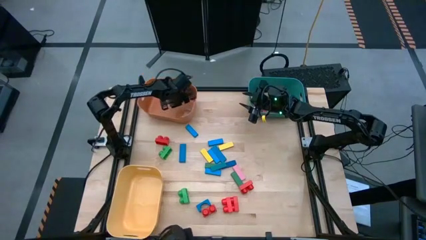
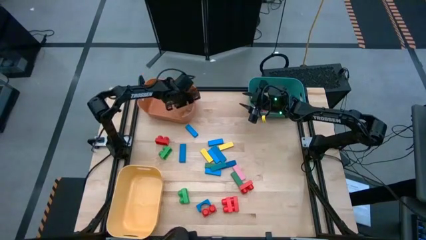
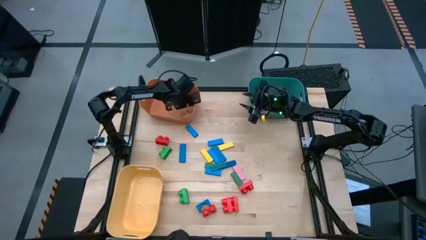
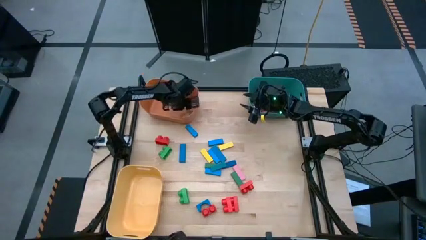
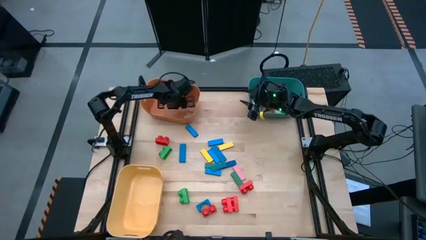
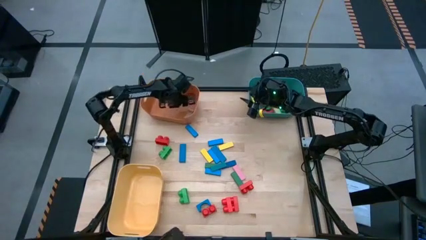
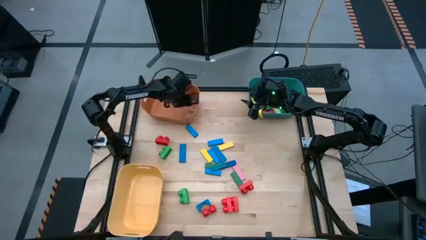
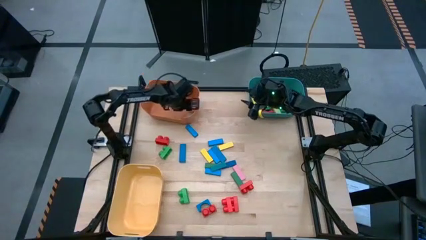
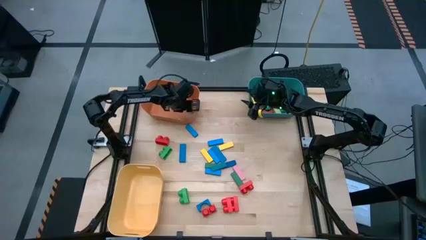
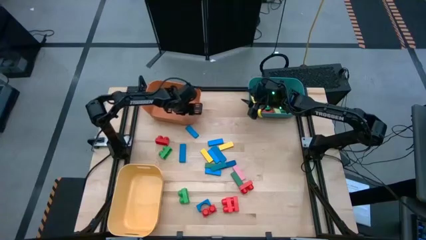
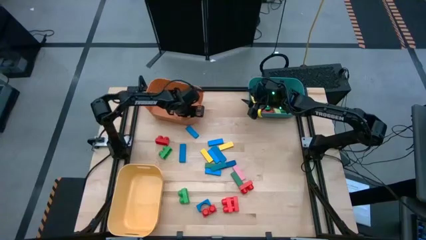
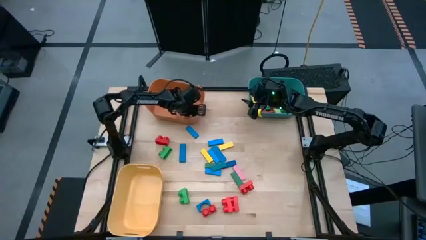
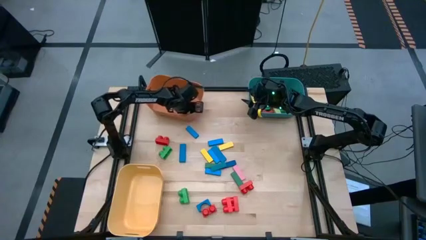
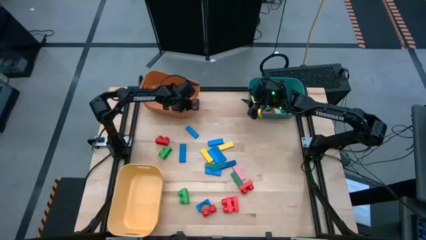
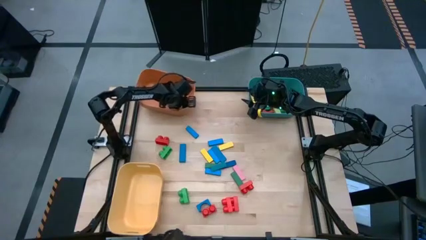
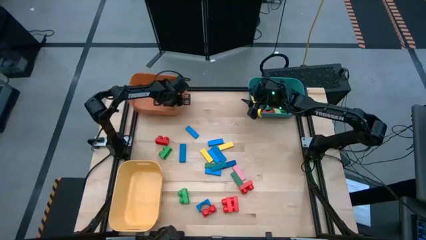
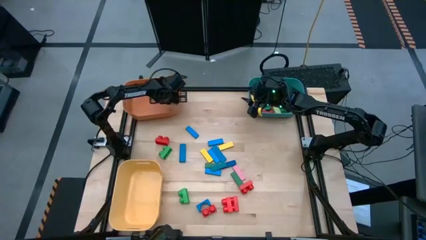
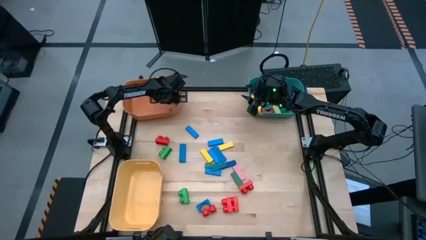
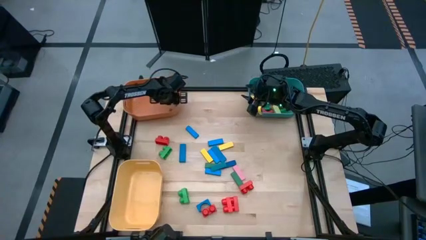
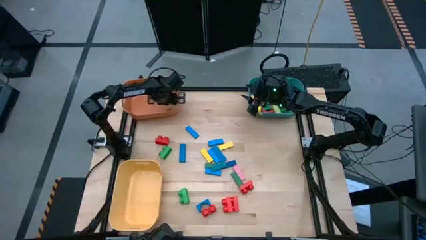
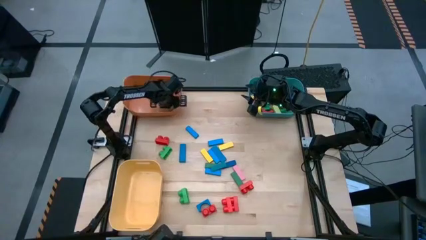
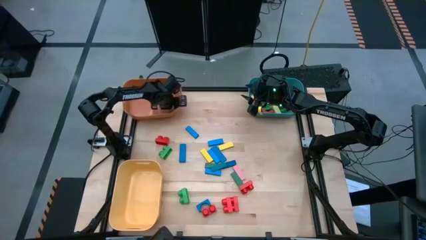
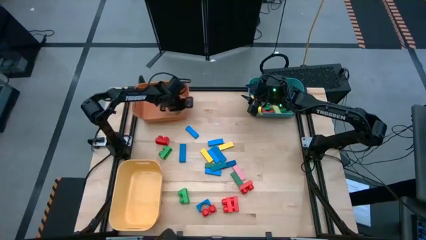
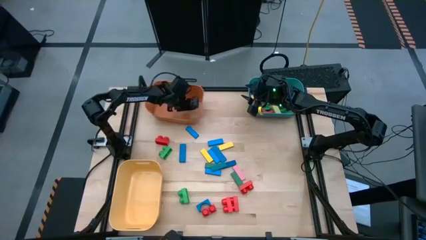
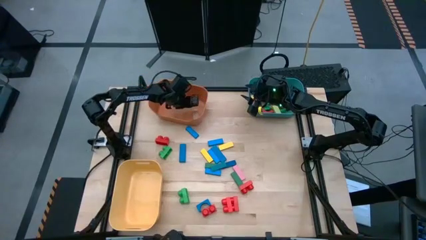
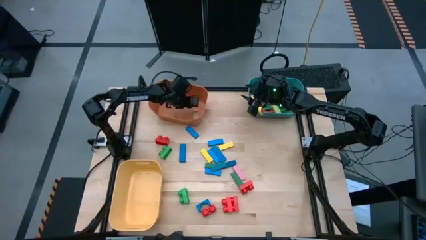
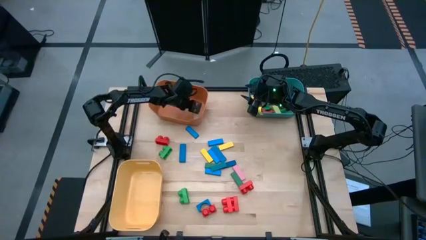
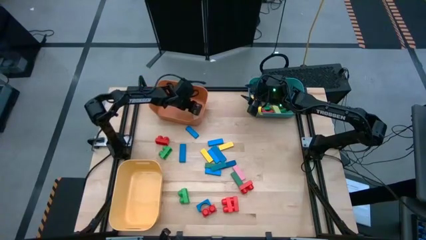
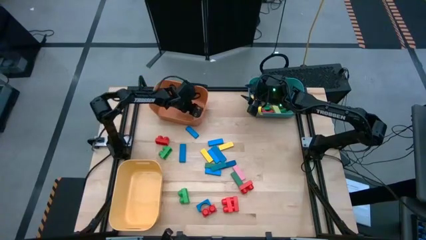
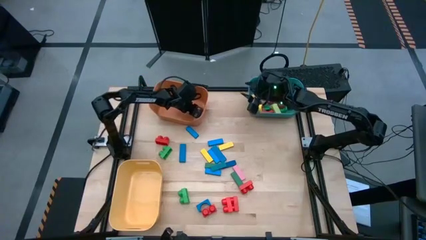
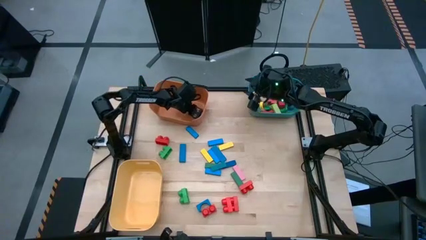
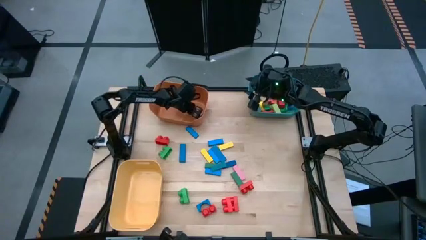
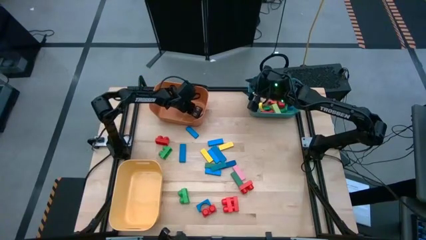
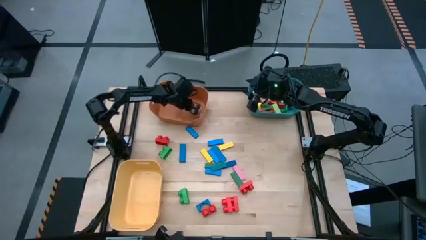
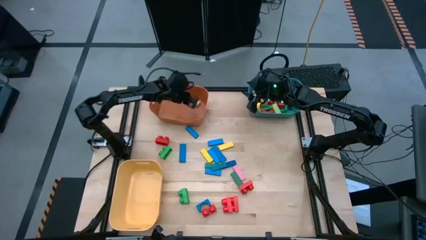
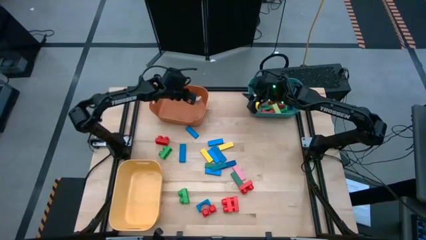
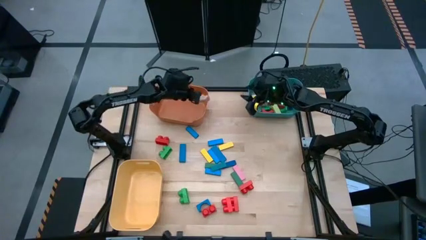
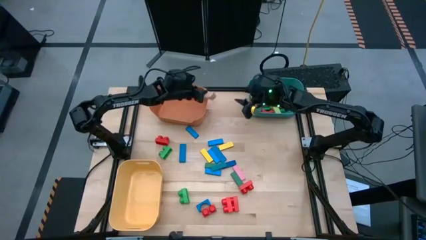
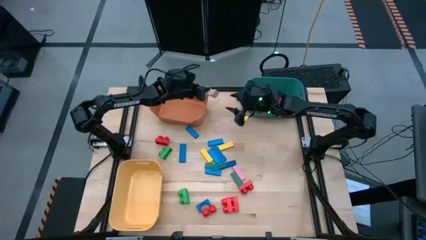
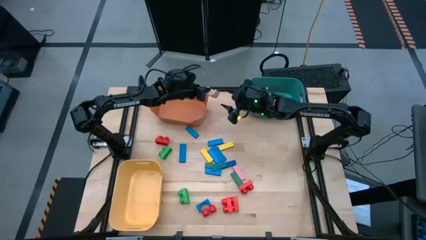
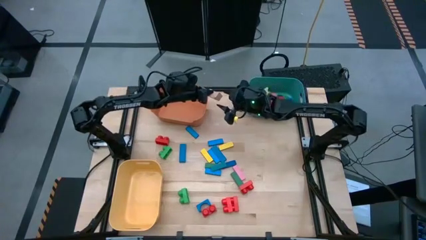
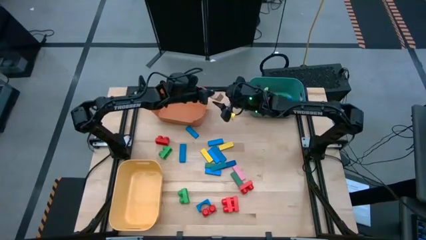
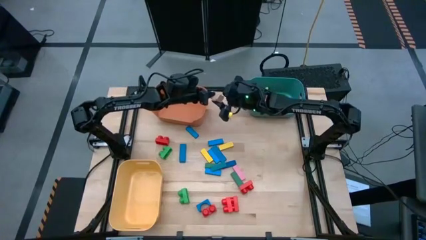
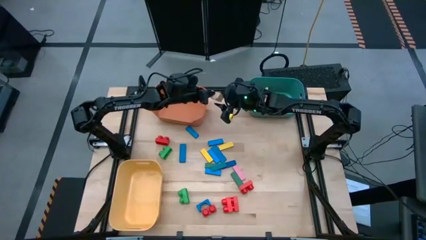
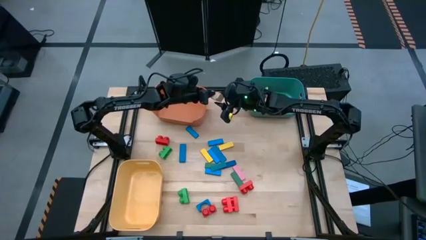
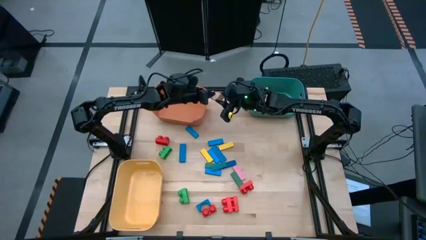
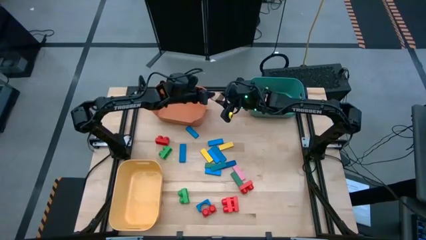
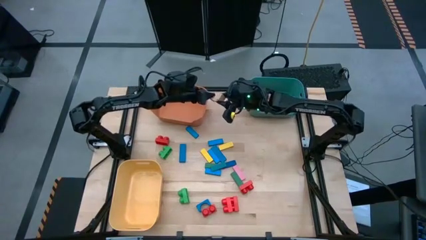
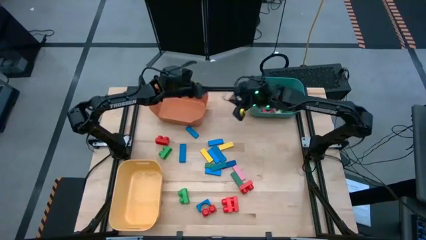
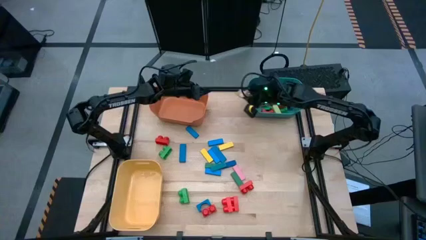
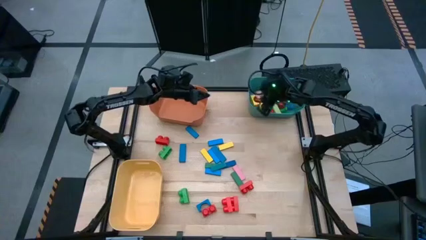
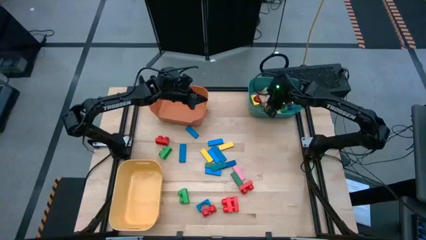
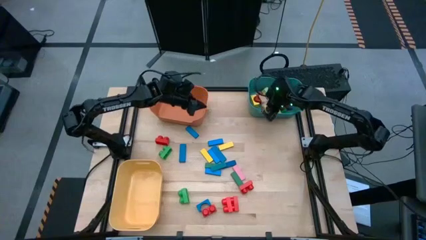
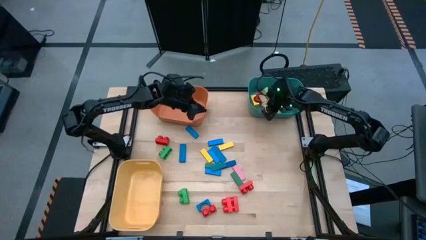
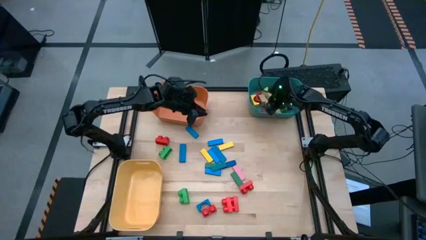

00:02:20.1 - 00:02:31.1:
Task: Sort blocks by size
Put the brown arch block into the blue bin

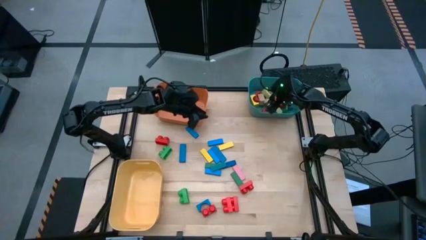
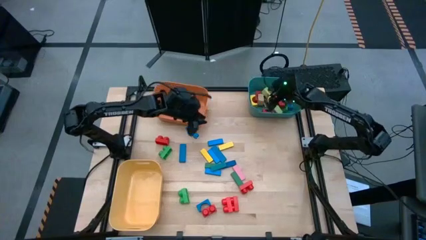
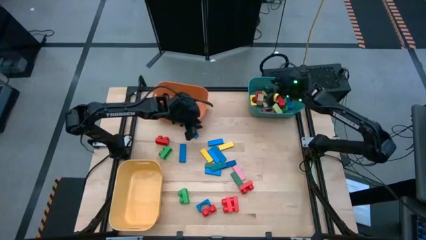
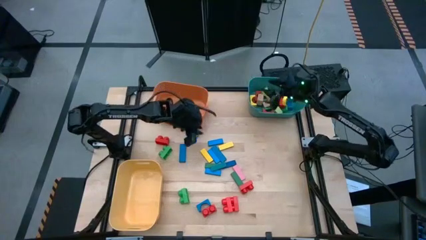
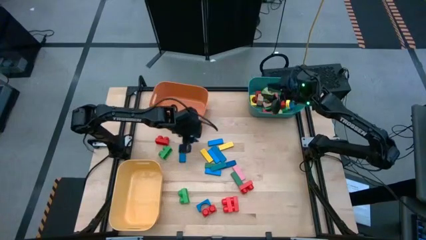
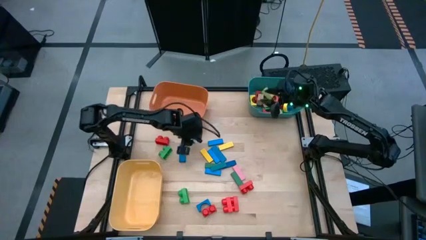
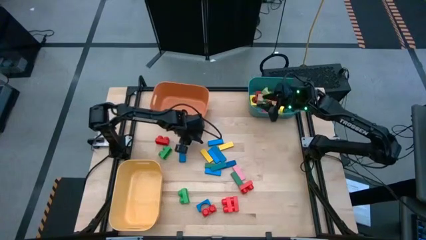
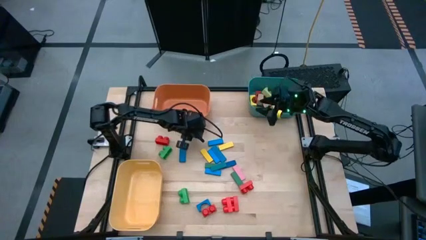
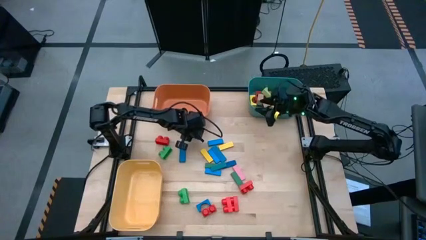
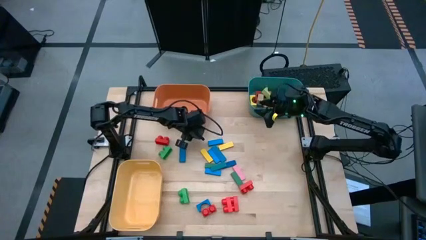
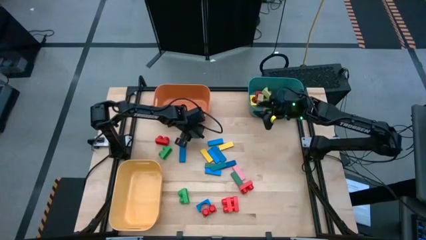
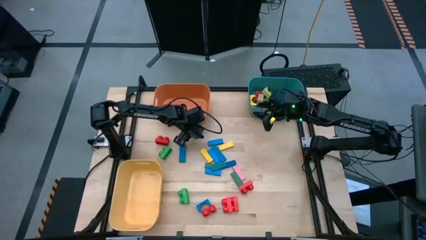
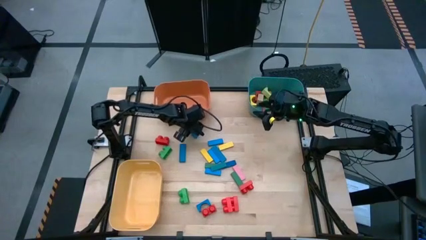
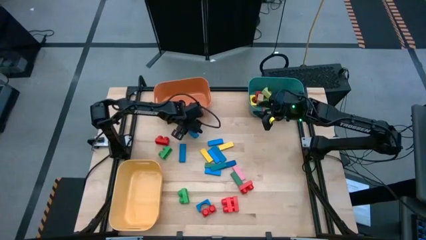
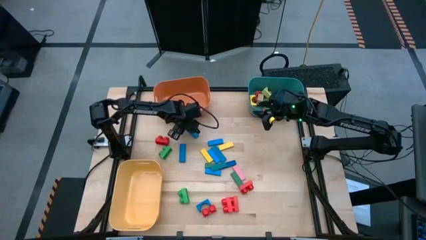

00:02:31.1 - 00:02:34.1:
Adjust the orange bin on the table

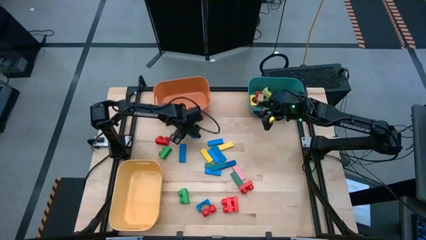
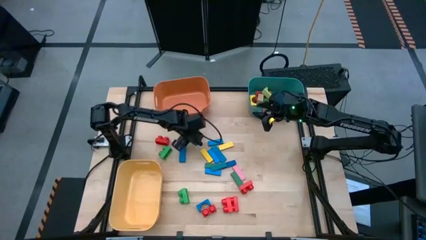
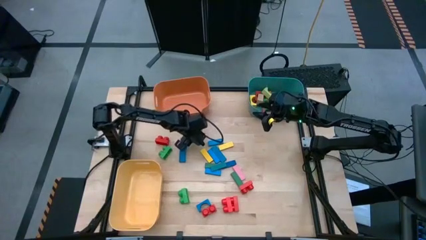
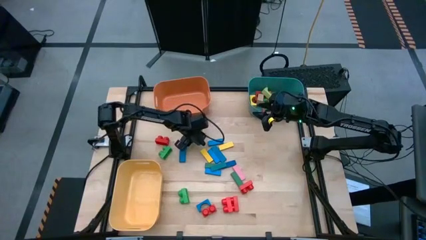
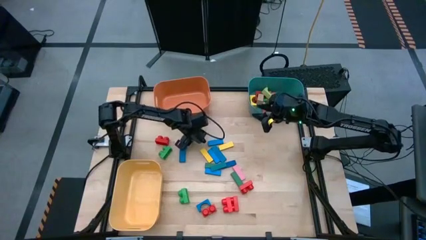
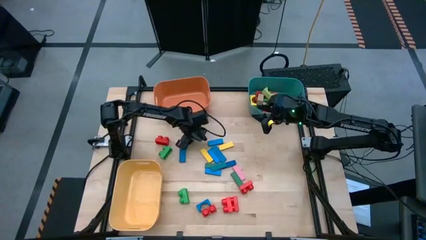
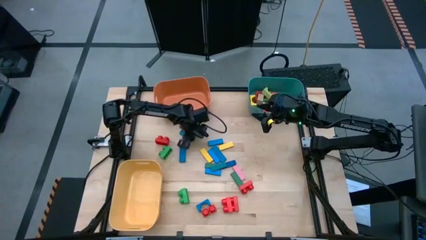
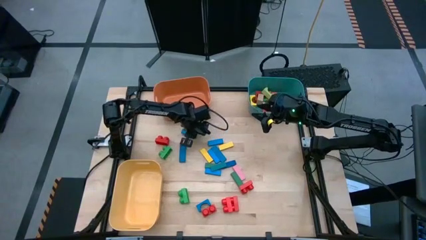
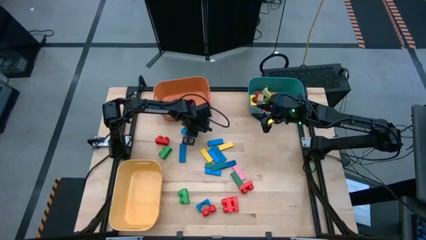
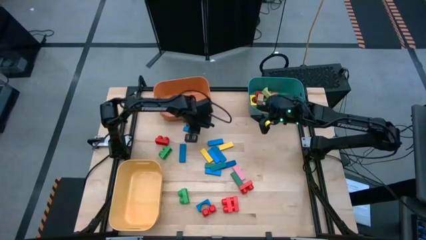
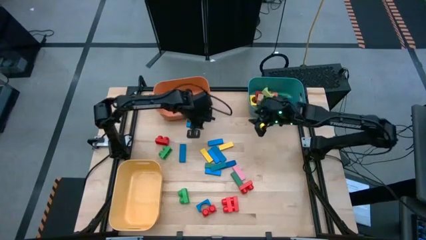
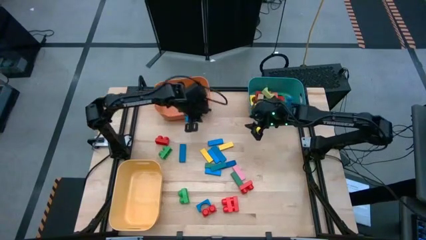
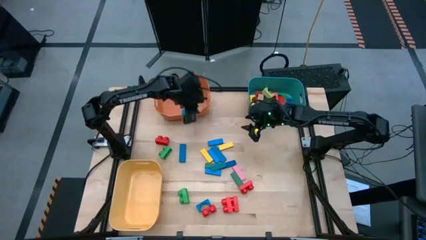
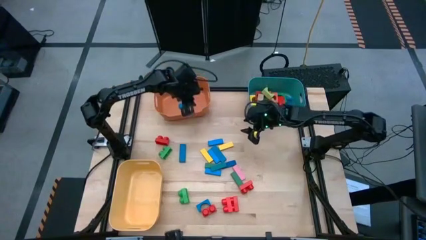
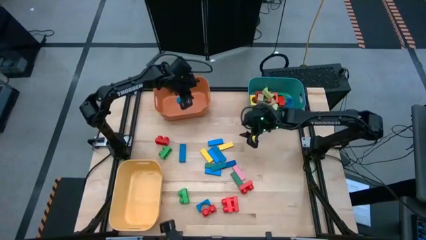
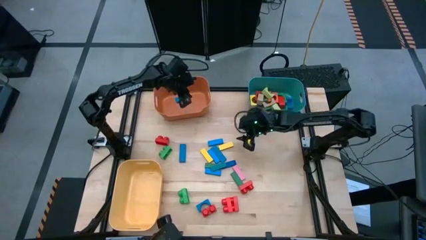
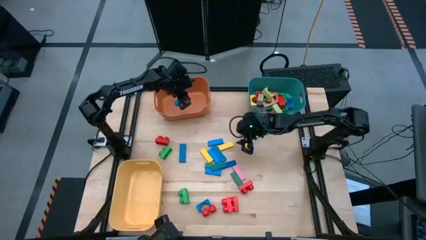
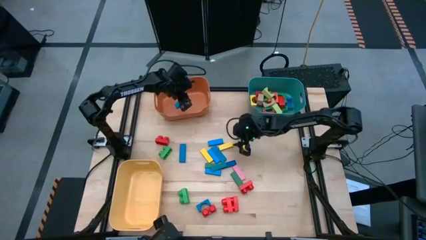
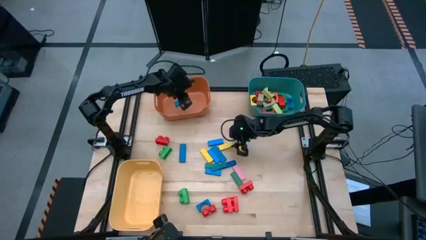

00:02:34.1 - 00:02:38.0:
Put the blue rectangular block into the orange bin
